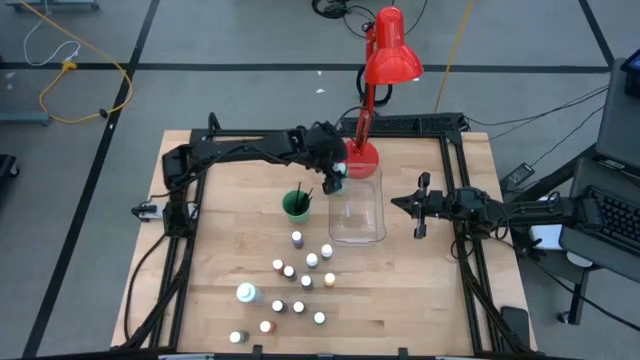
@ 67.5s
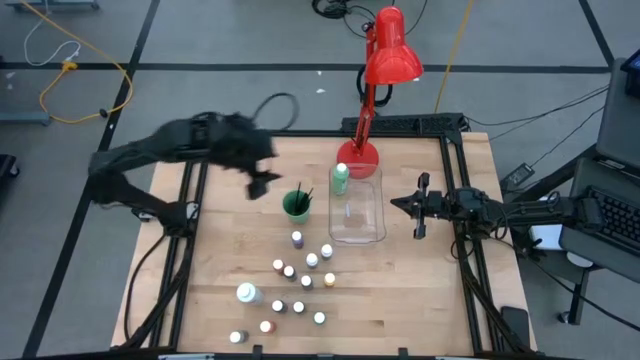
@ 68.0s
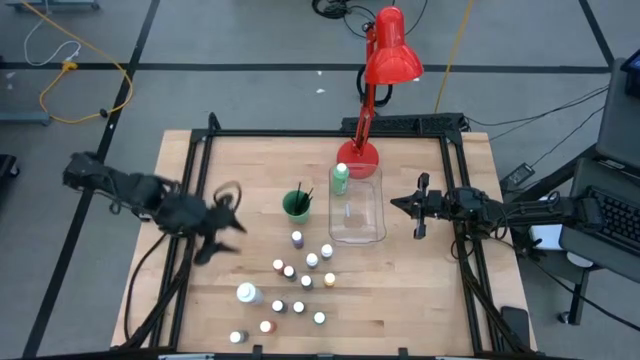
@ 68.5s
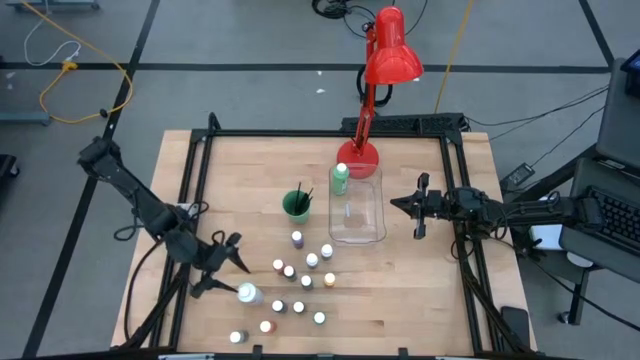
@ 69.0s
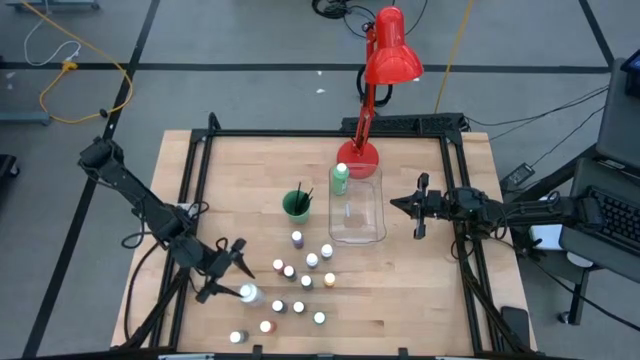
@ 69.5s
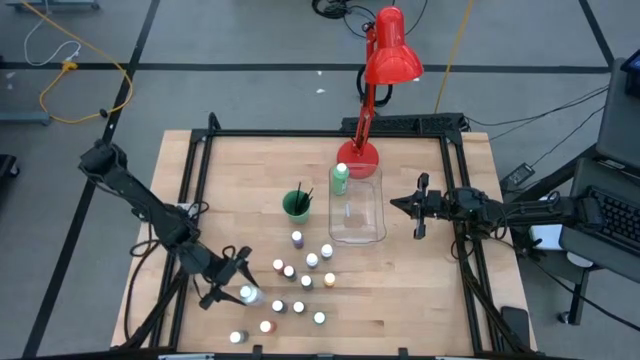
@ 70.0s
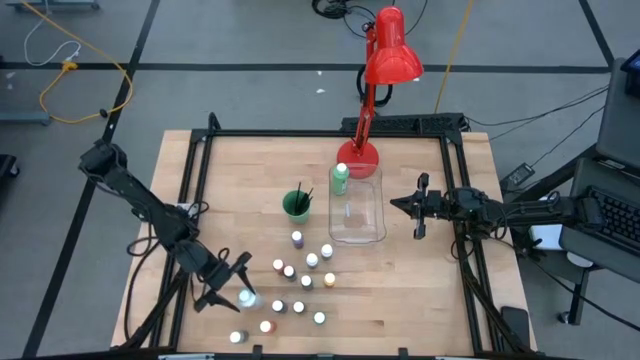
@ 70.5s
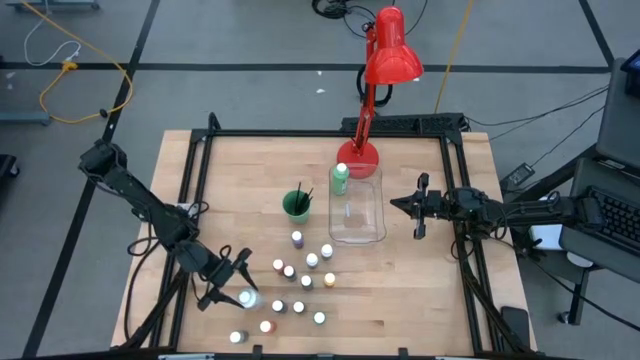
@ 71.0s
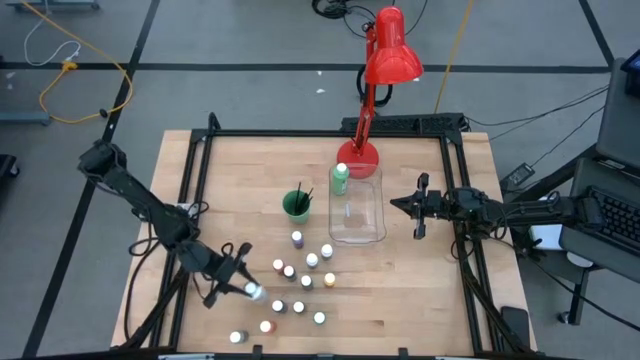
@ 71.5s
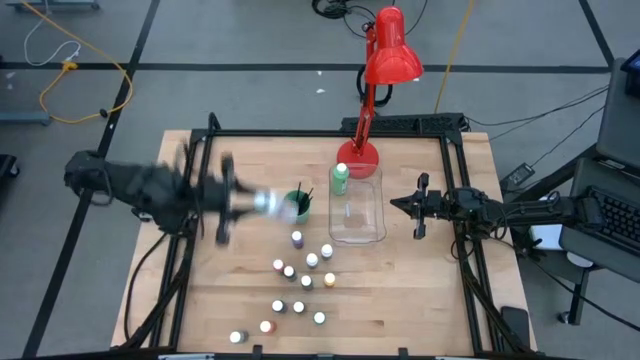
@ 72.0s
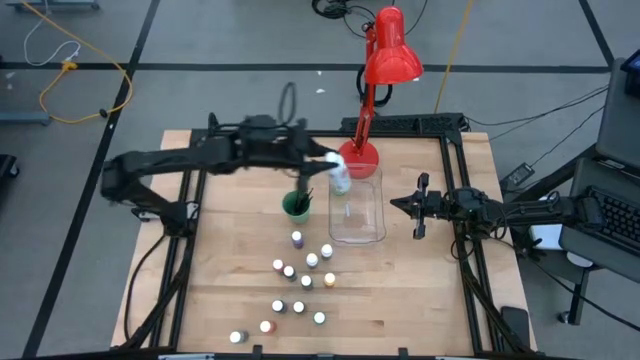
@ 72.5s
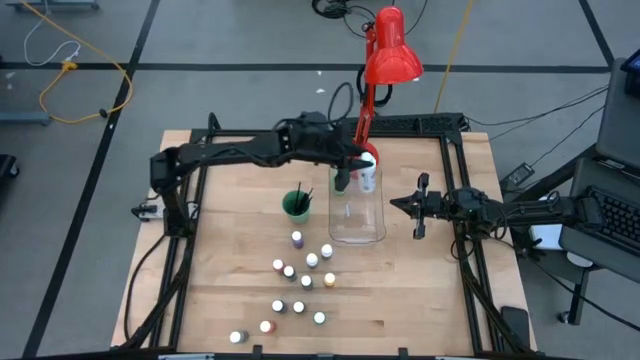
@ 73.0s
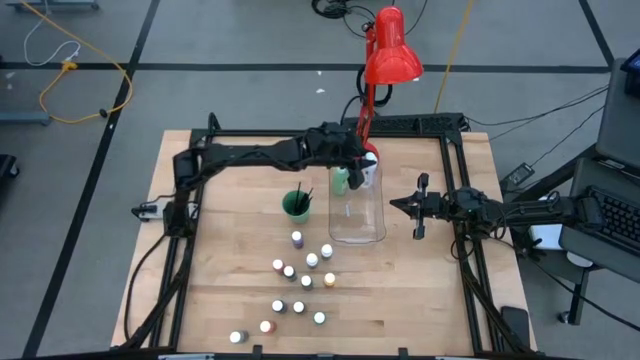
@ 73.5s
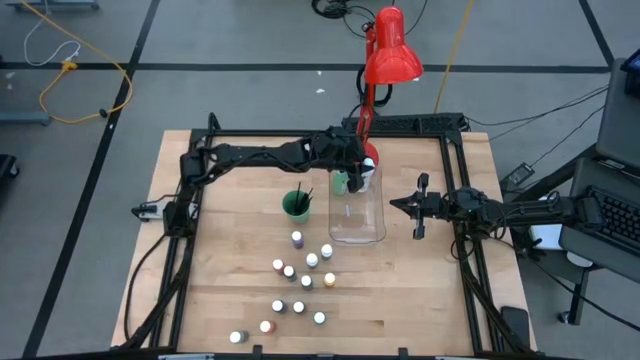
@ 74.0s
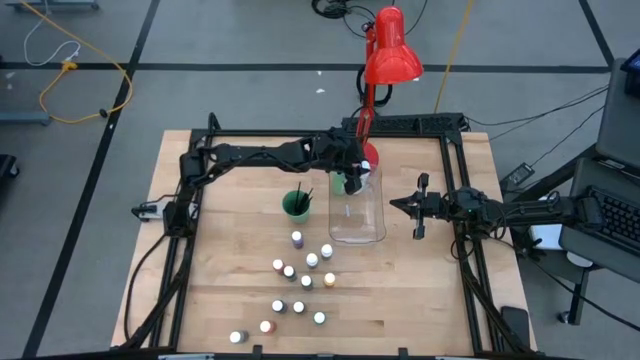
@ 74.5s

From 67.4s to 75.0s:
Task: Pick & Place Paint Supplies
Put the large white paint bottle into the transparent bin

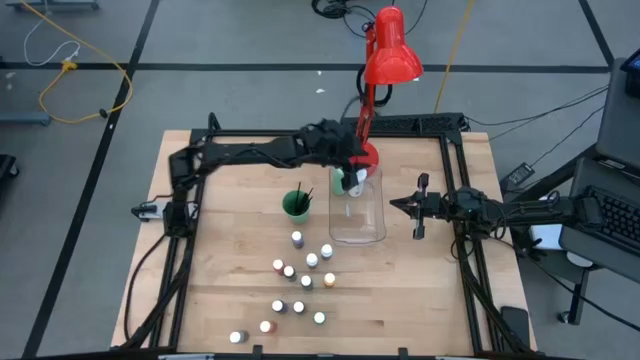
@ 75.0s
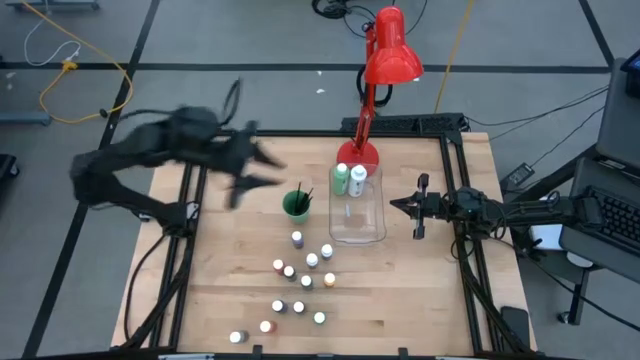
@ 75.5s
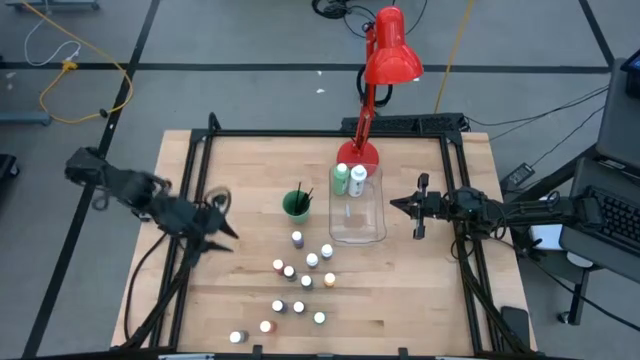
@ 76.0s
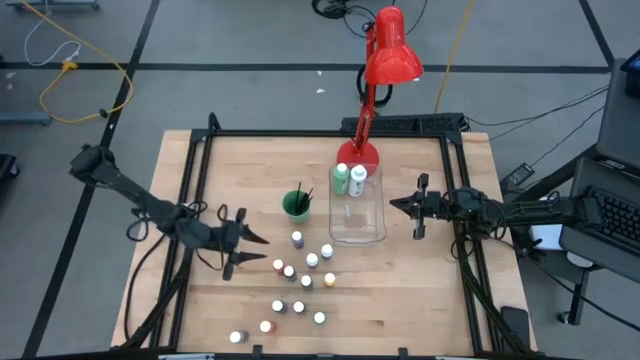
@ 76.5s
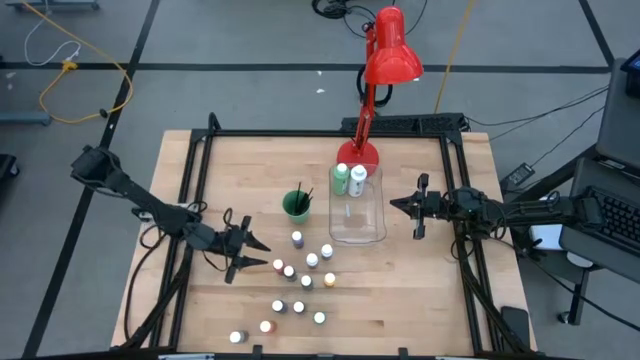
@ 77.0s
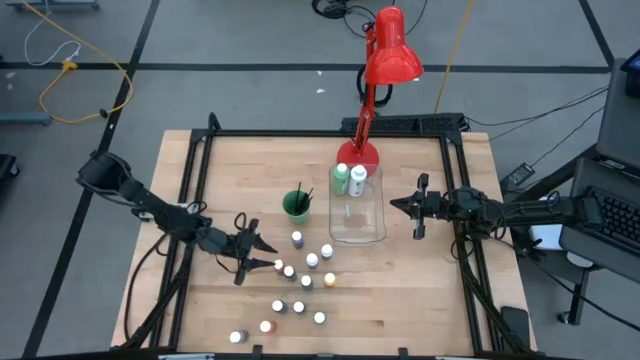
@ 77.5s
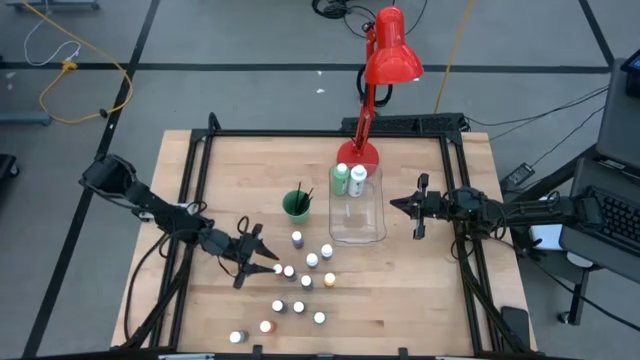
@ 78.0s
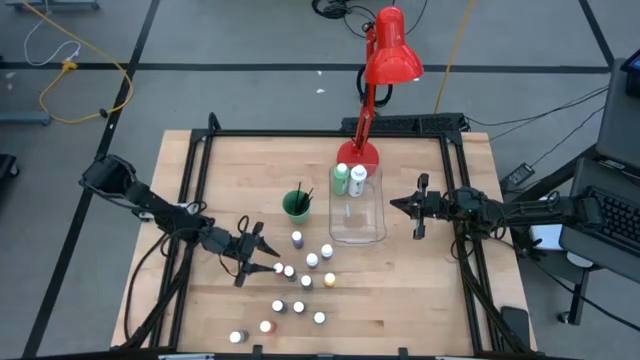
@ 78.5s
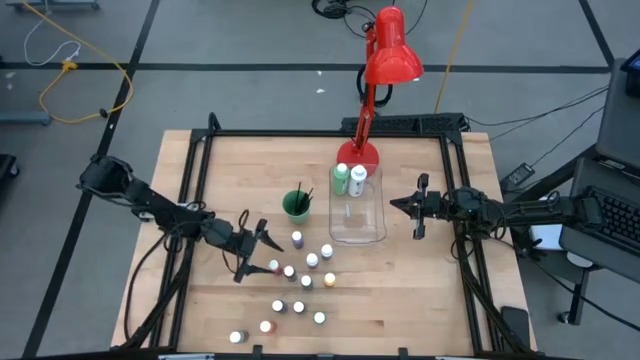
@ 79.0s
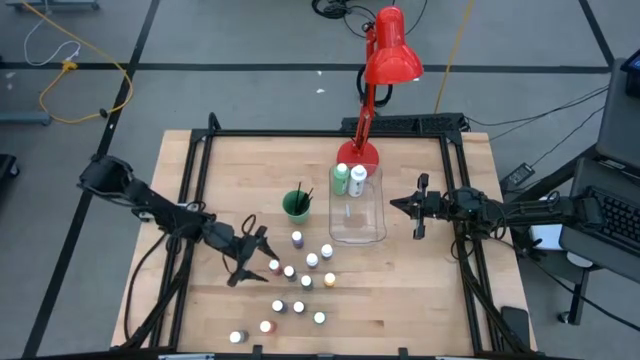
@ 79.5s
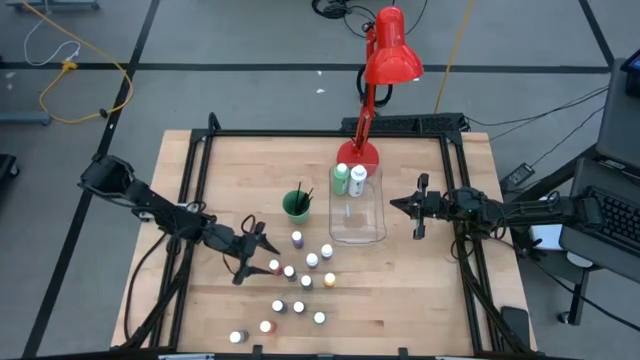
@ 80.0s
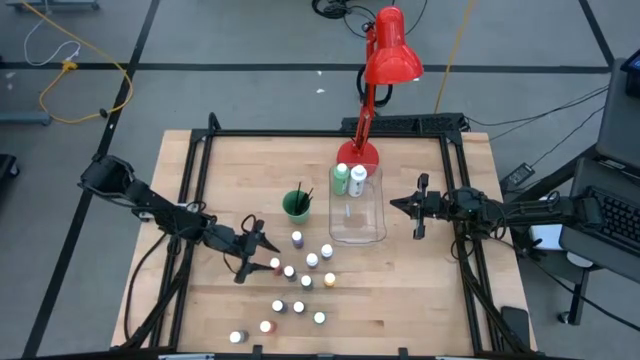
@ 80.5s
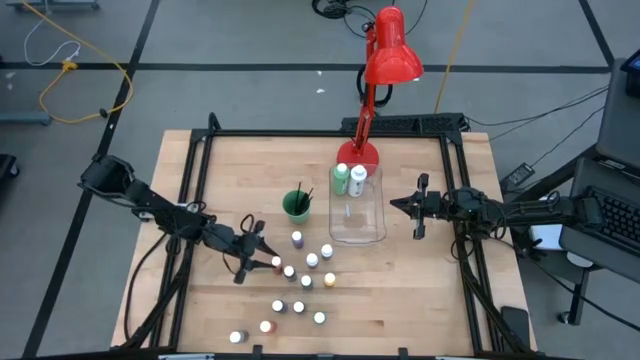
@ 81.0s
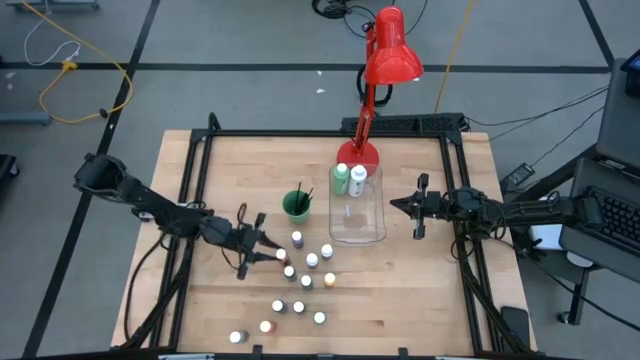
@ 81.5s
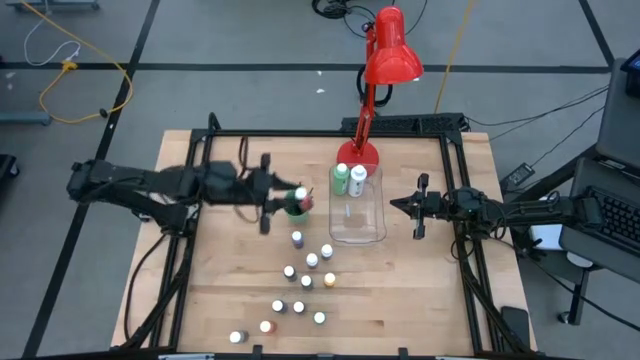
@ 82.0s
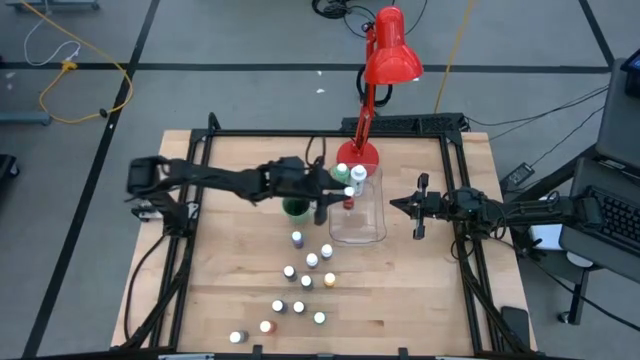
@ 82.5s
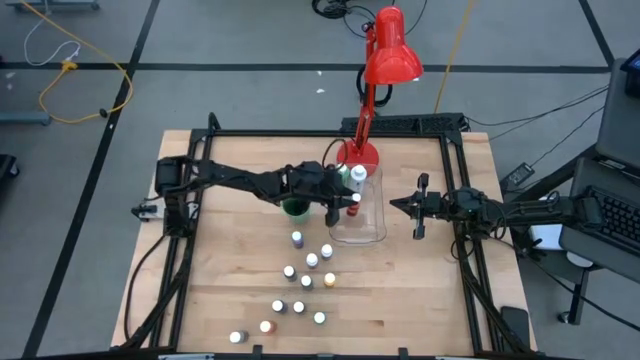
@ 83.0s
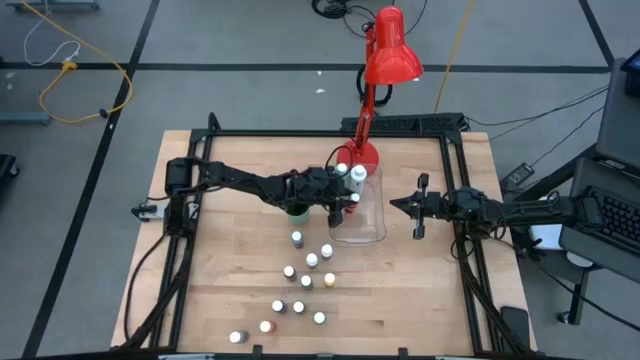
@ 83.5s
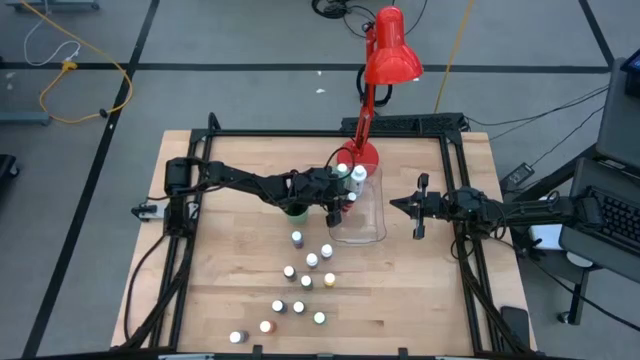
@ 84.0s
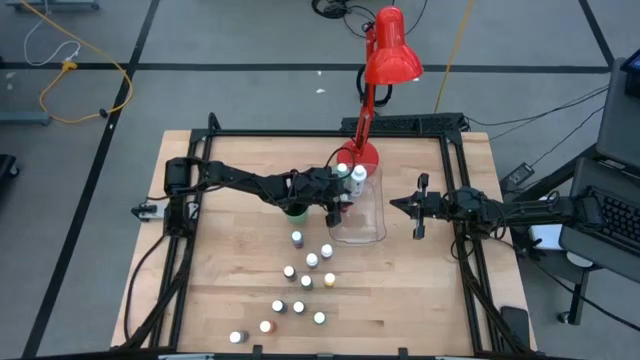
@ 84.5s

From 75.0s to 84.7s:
Put the top orange paint bottle into the transparent bin

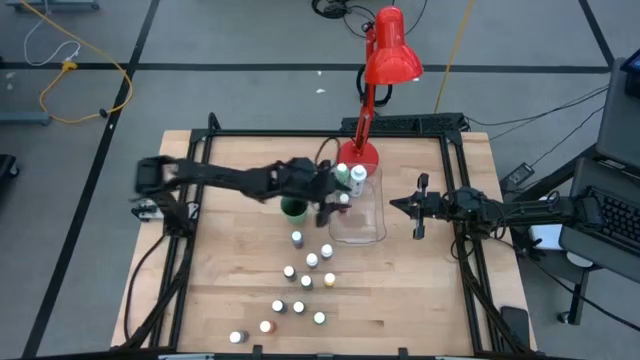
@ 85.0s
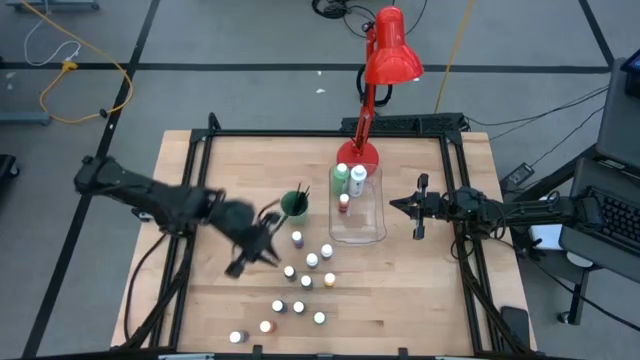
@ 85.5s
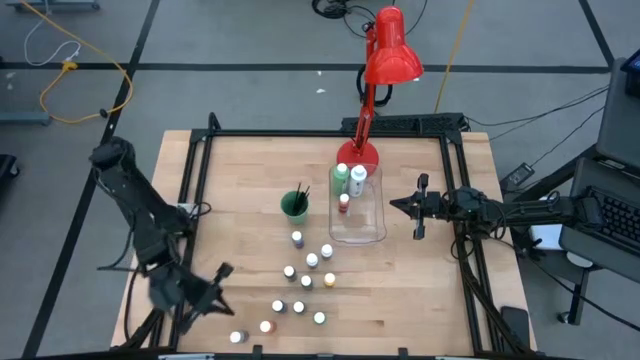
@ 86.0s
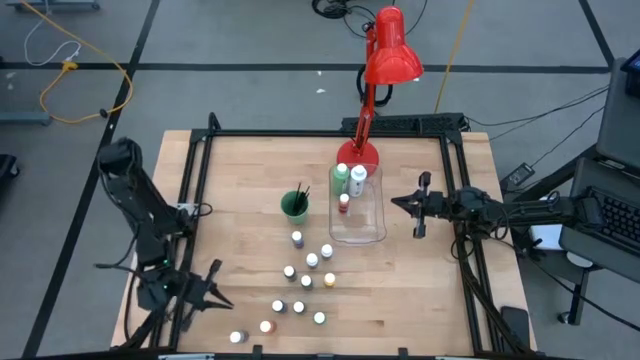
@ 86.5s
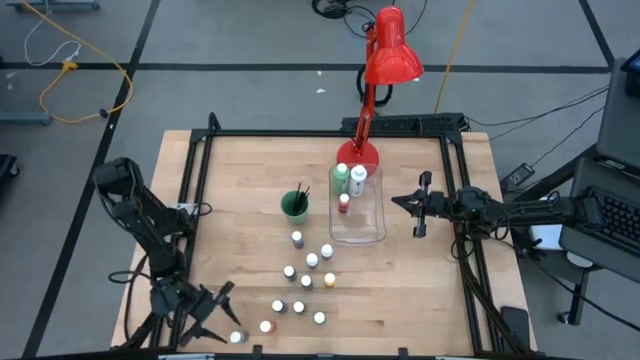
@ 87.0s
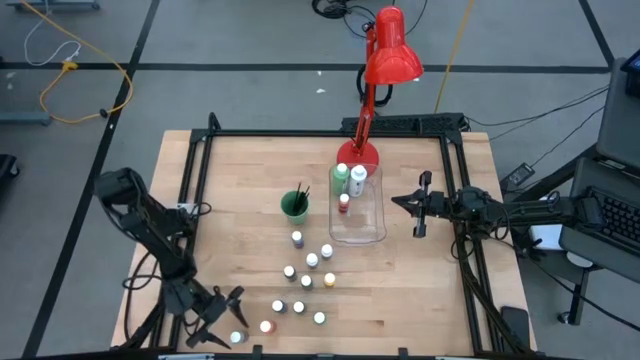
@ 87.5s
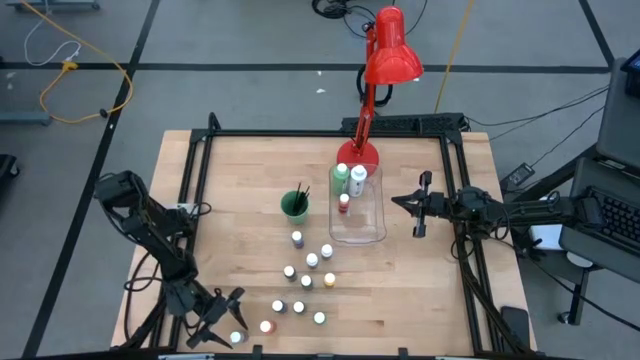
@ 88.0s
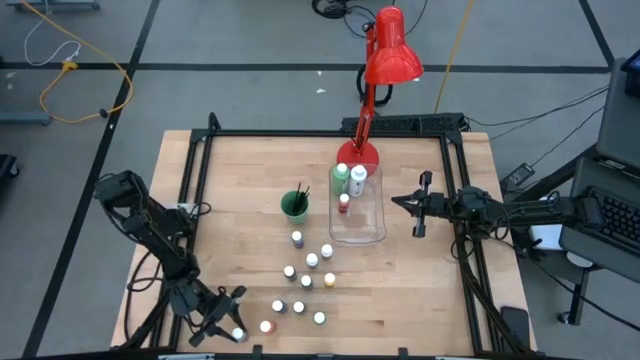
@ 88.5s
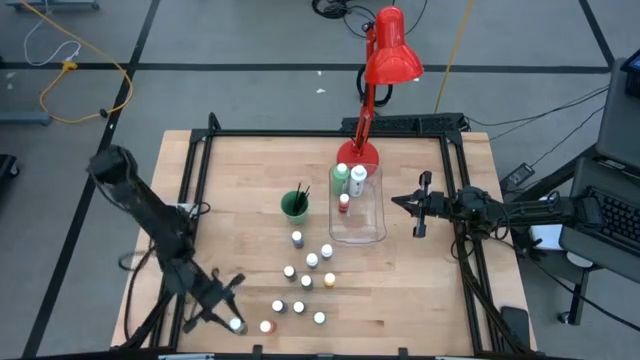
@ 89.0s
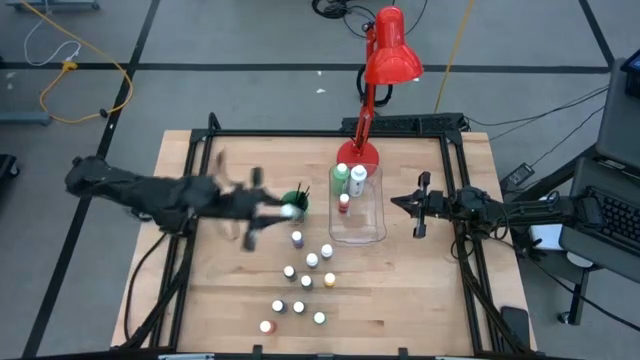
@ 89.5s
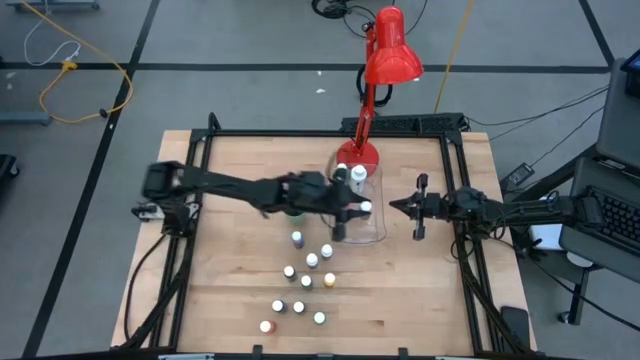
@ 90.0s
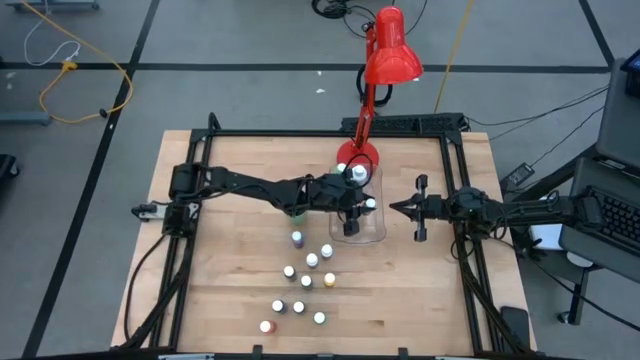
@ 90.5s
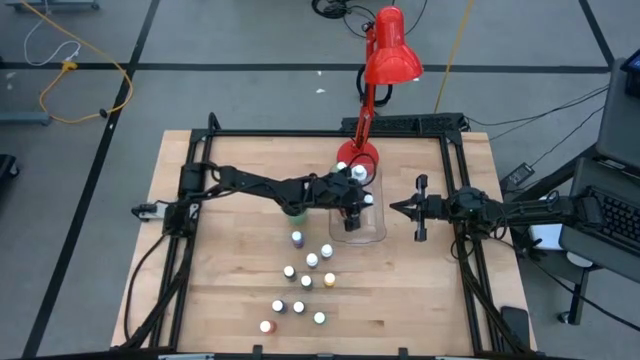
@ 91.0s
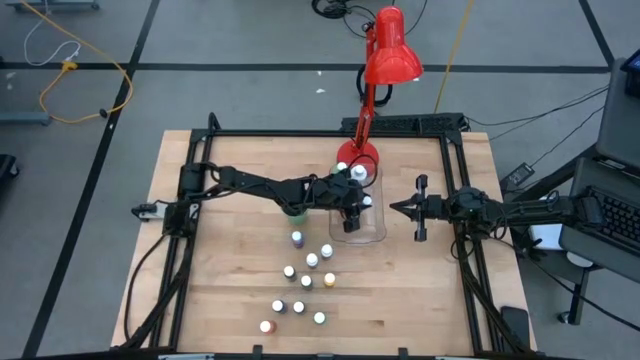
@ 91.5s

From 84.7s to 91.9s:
Put the gray paint bottle into the transparent bin
